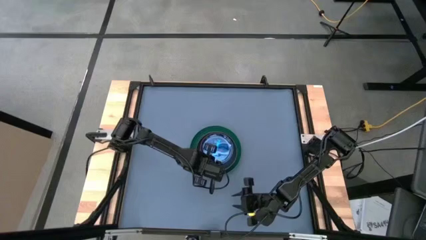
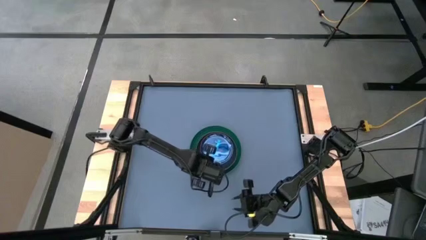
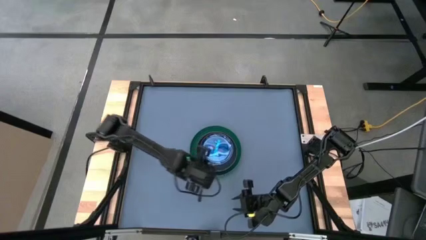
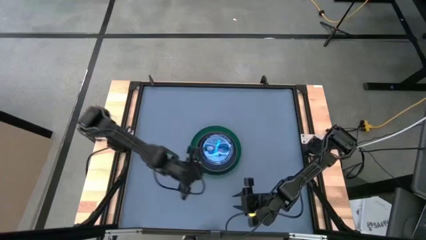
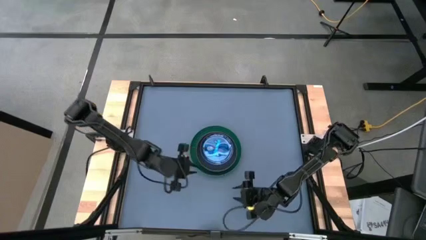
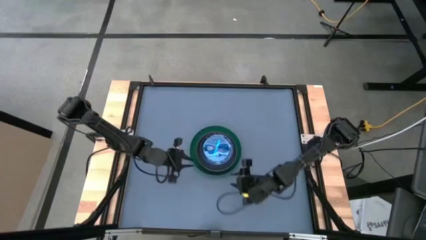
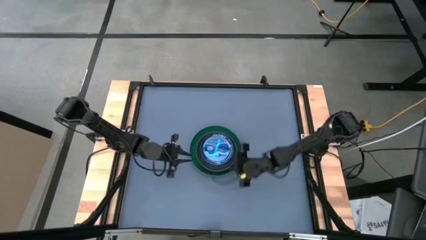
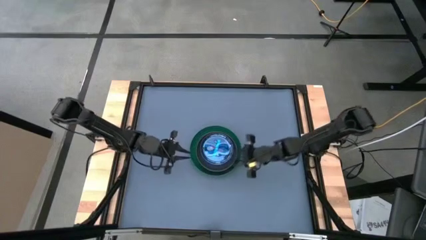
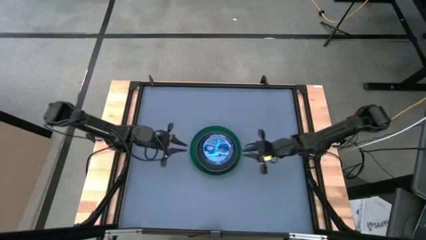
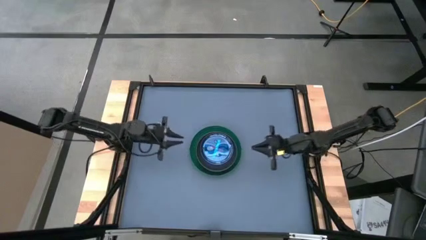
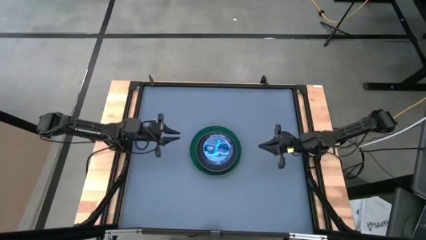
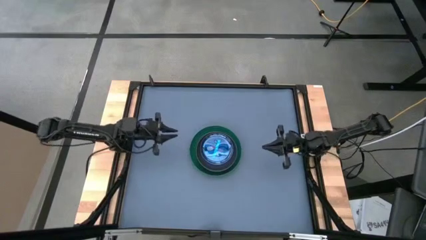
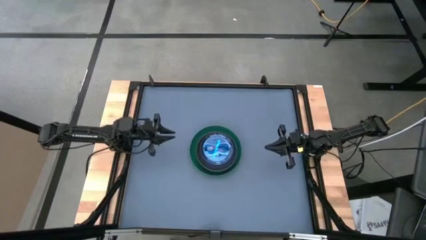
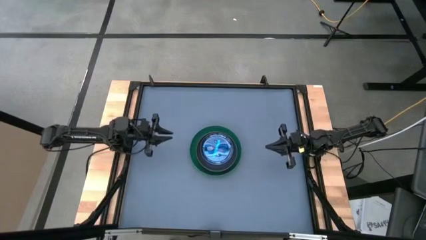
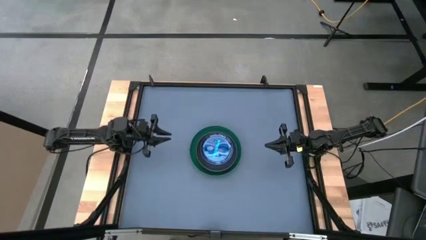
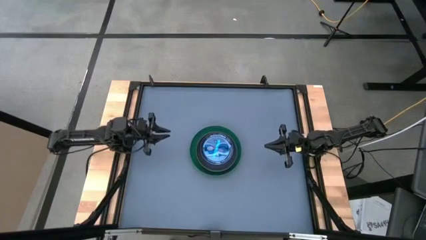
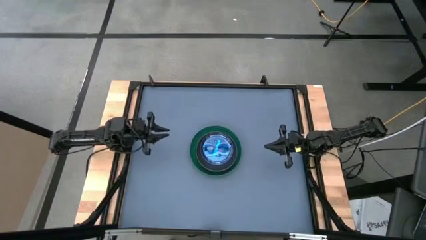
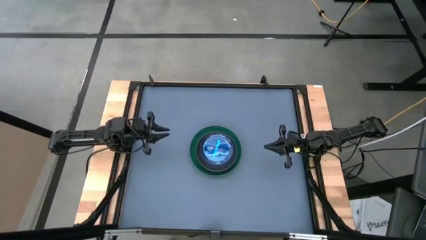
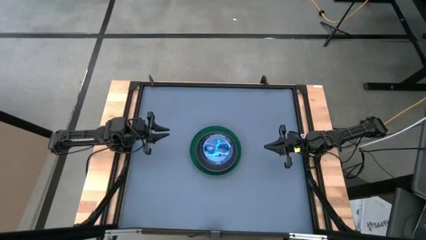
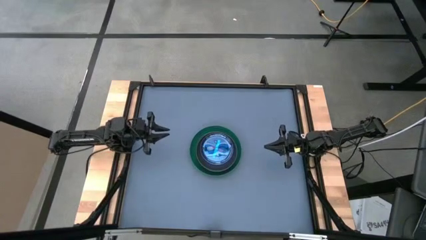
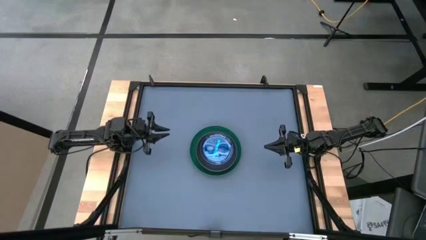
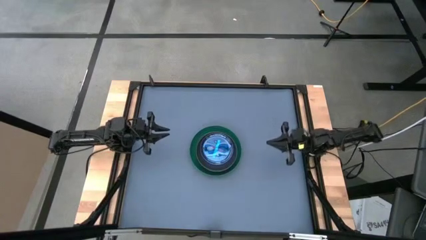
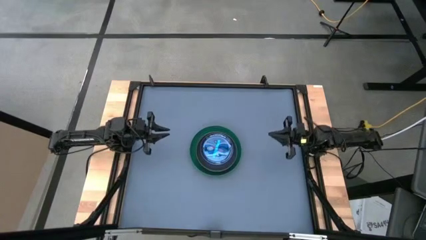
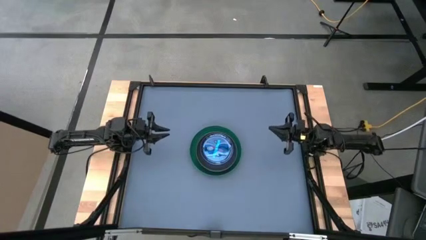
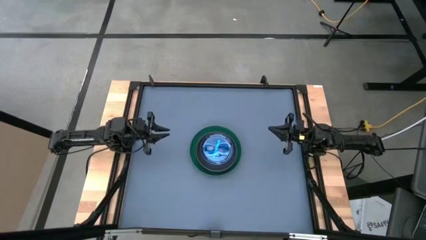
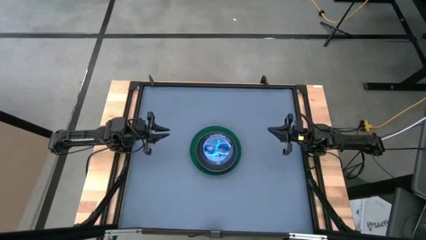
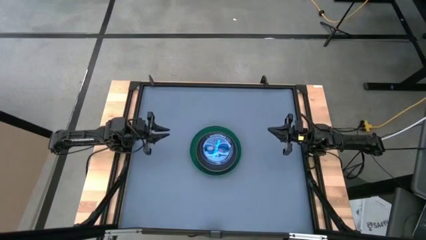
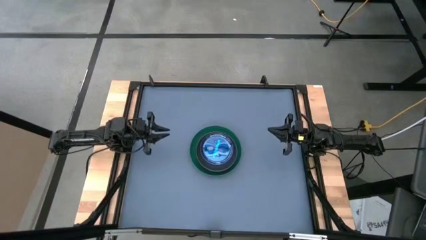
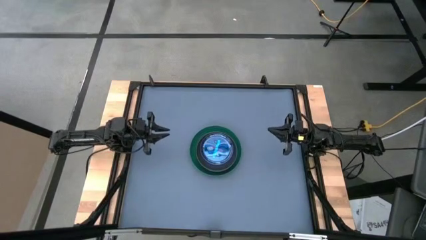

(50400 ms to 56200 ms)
Task: Stack plastic plates
Return to Home Position

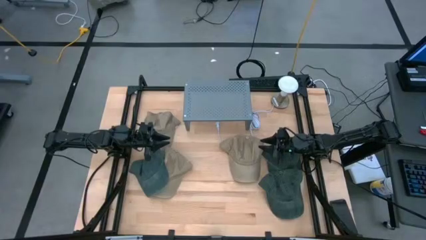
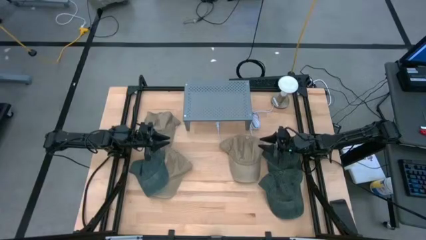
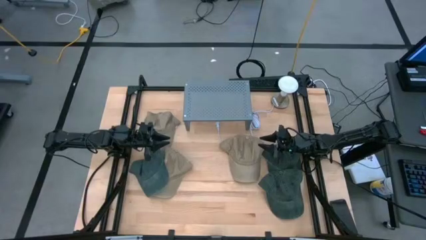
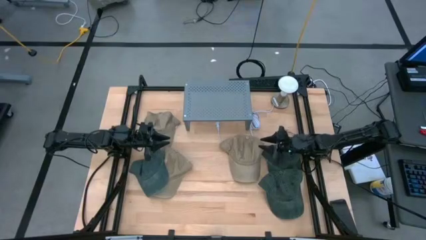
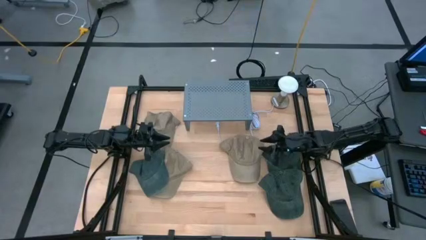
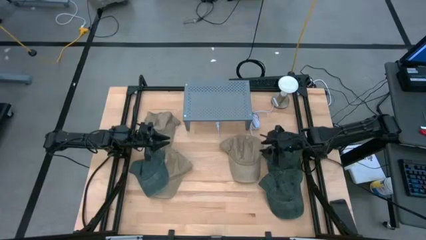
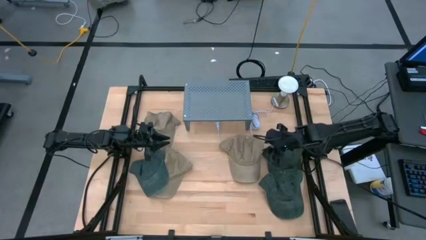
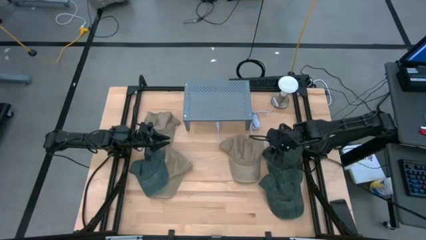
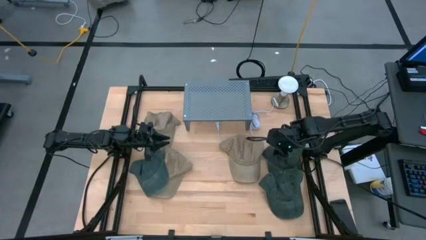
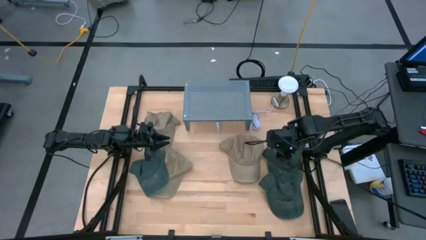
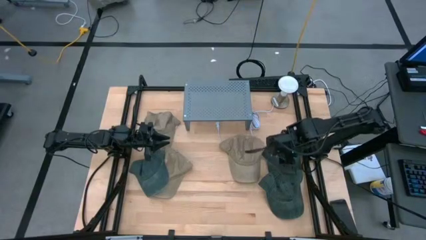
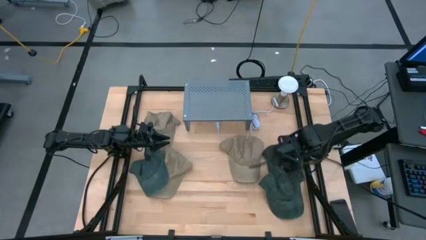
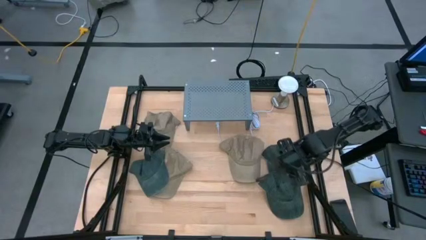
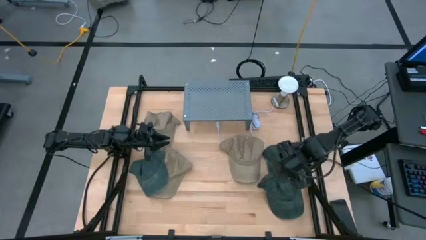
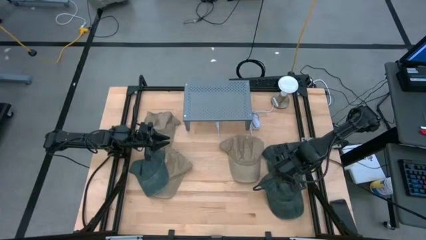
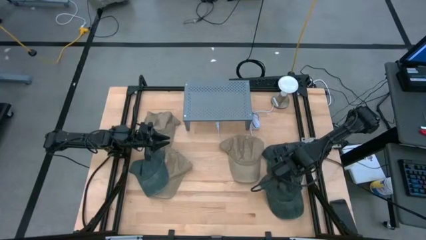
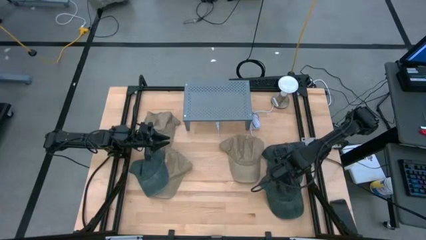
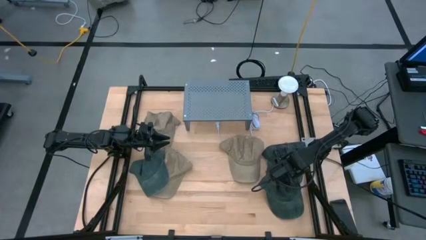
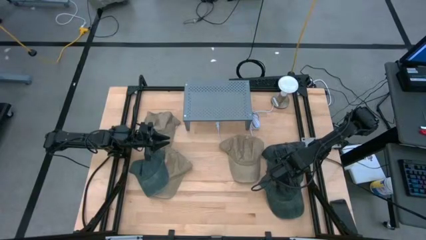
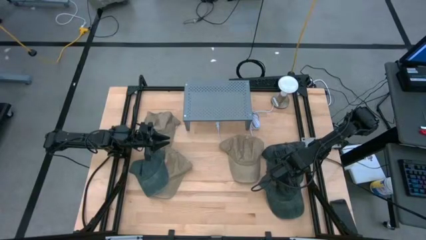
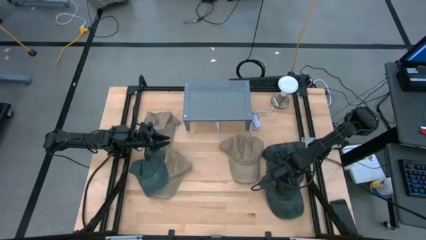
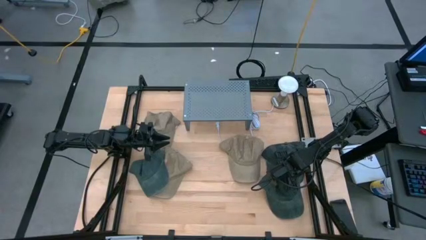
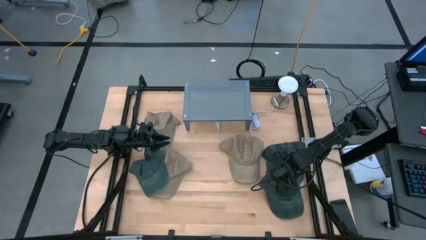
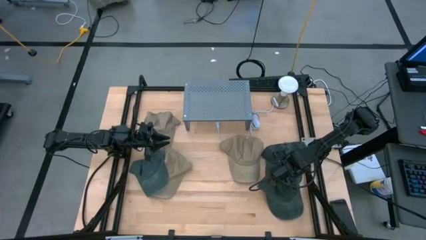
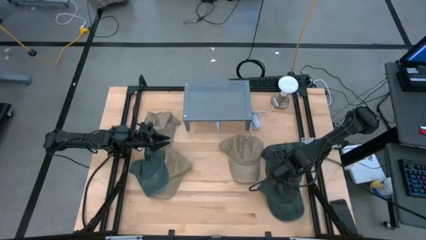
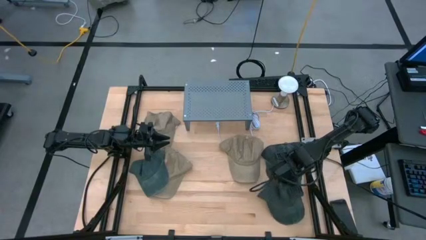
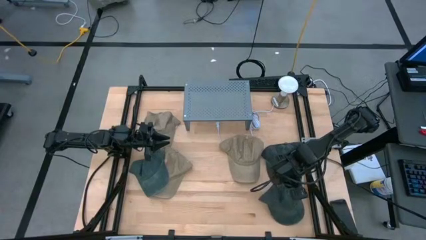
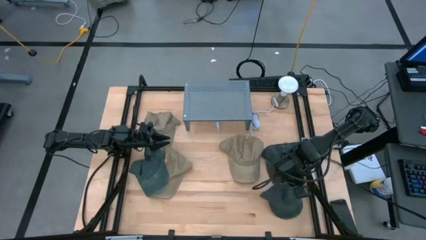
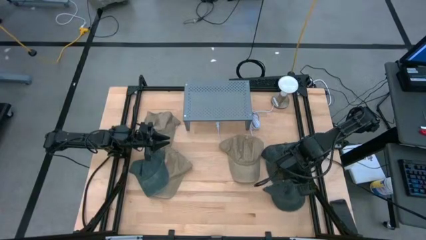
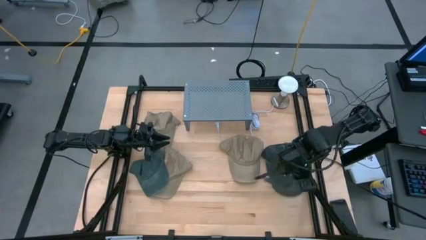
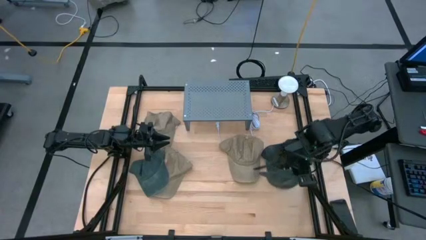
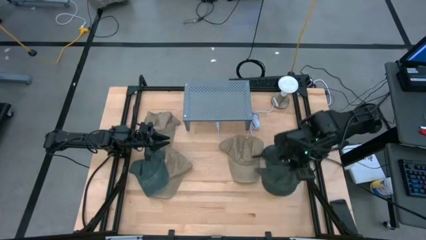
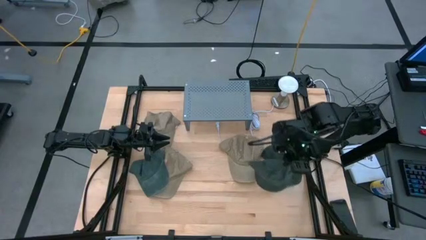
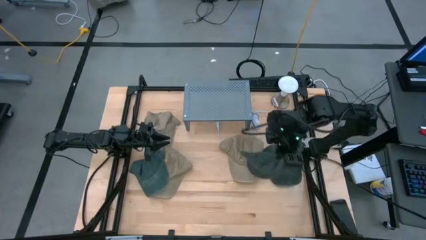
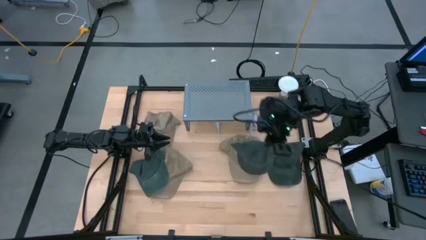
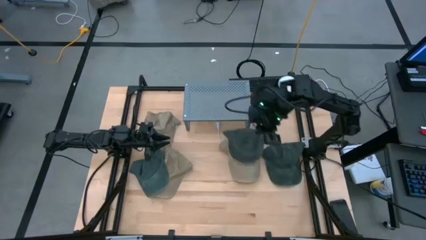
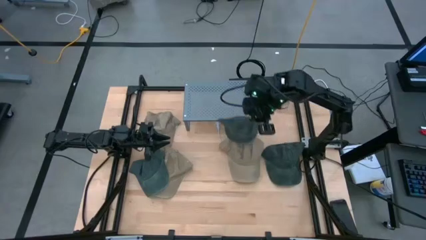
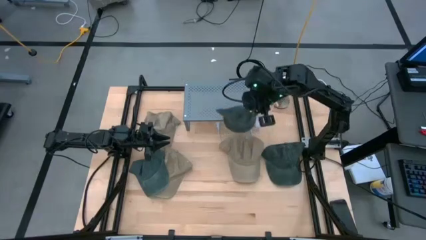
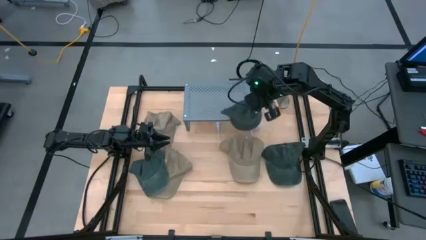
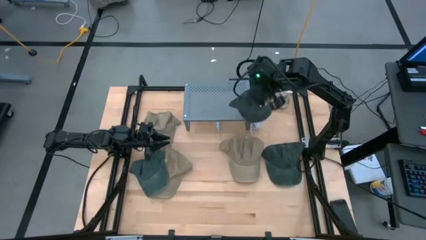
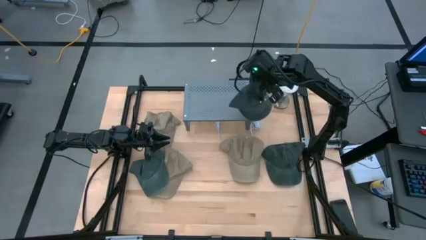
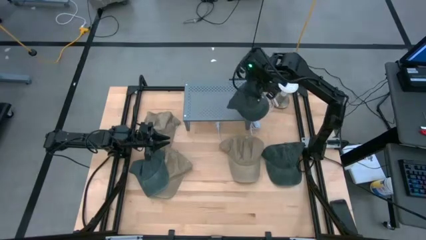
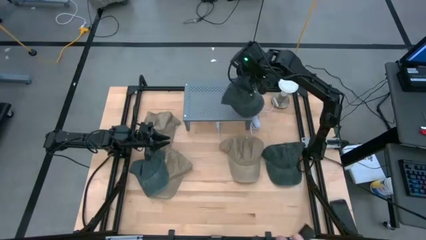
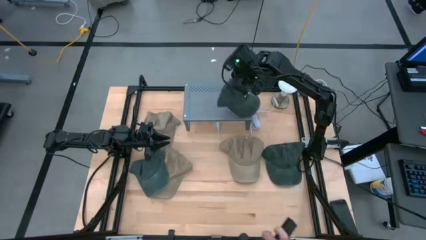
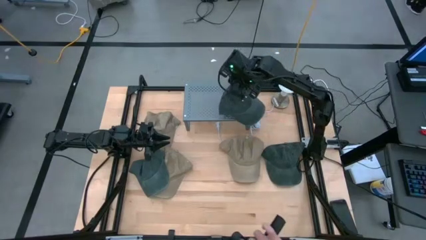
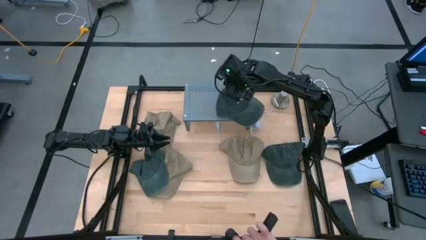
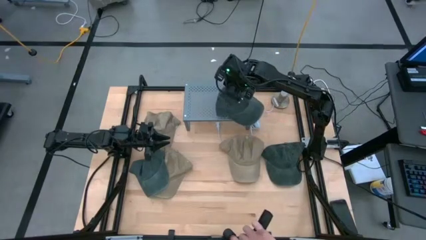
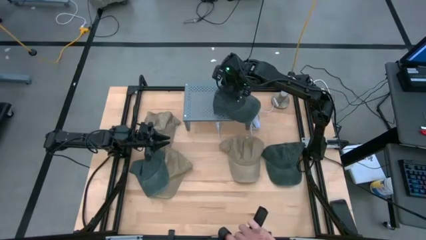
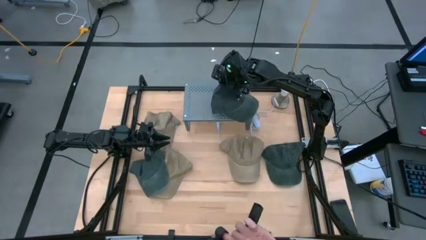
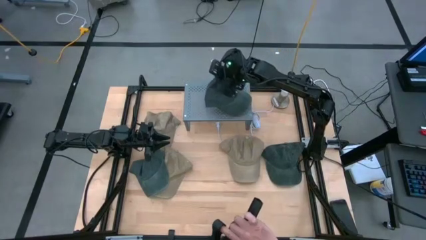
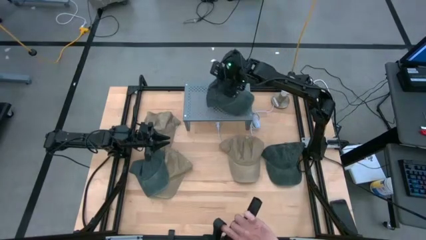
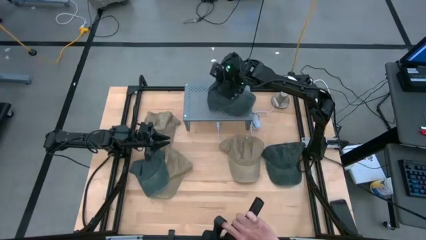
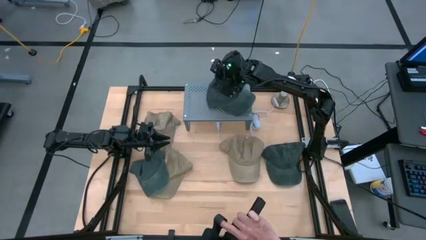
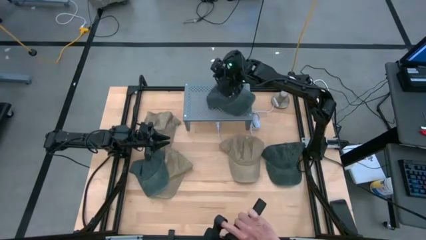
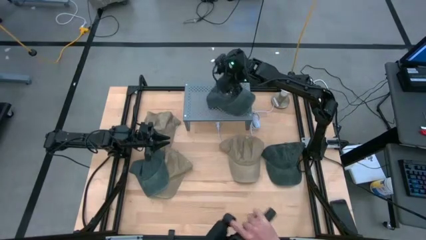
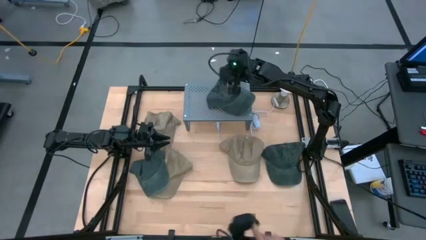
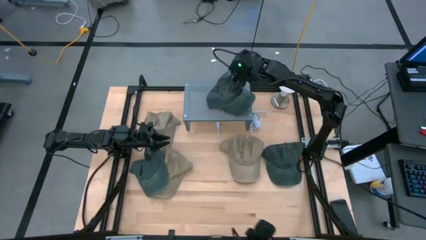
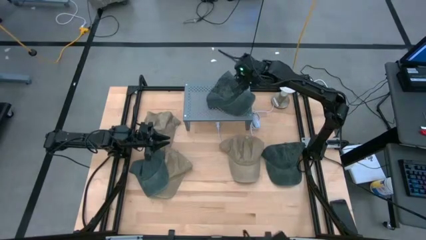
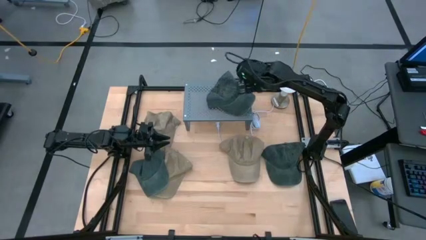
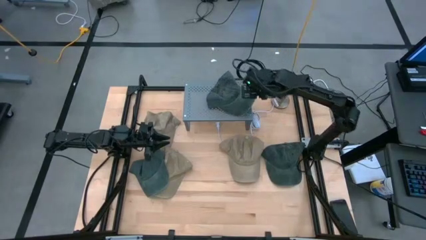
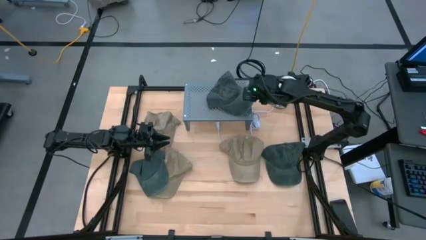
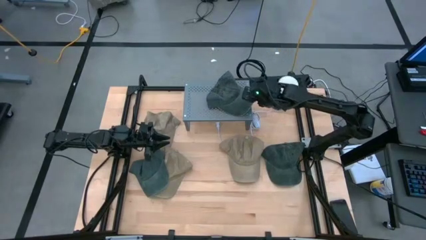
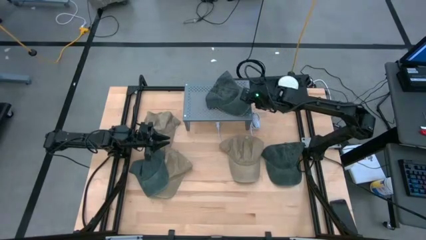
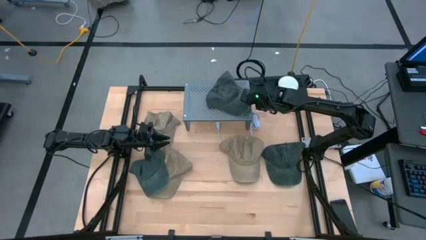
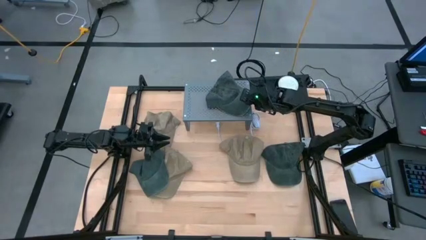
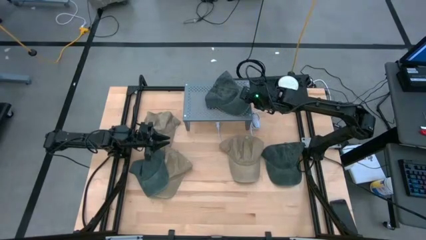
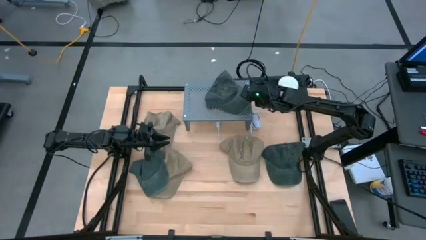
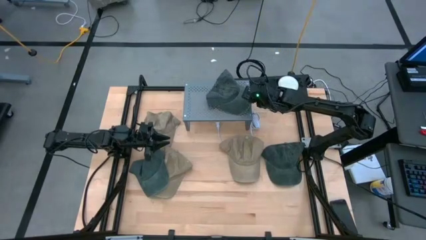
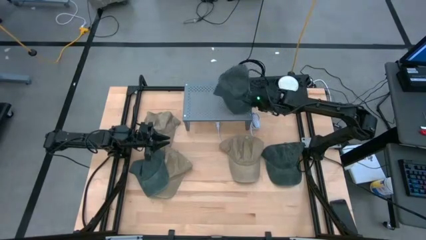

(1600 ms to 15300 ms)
Task: Pick & Place hat
Put the bottom right black cap on the shelf
